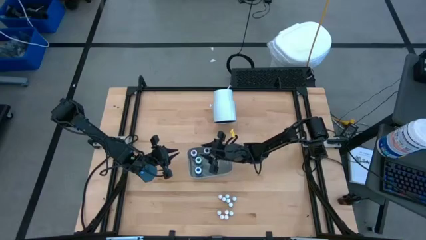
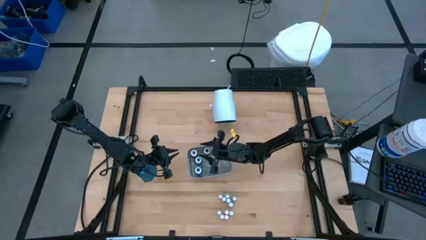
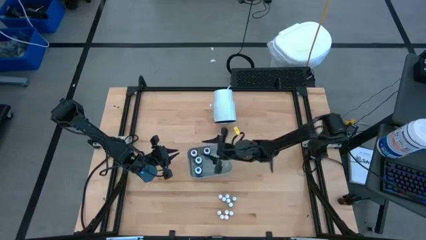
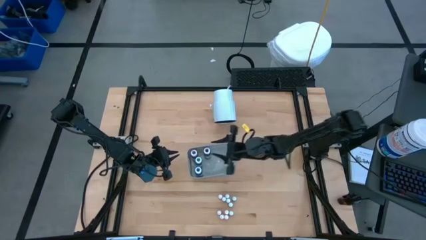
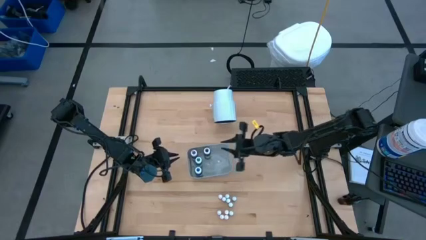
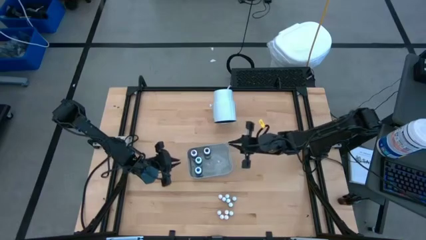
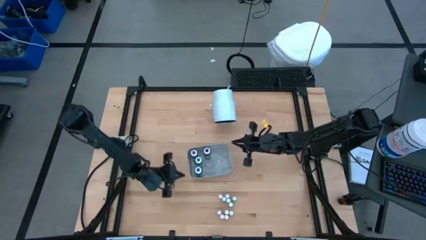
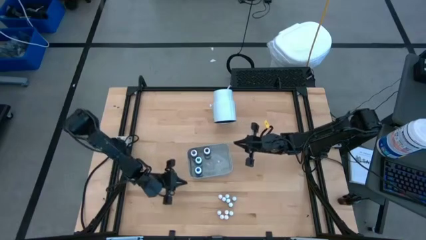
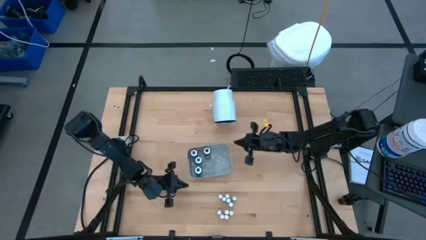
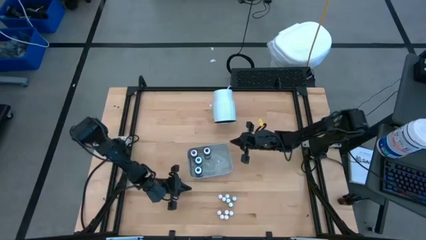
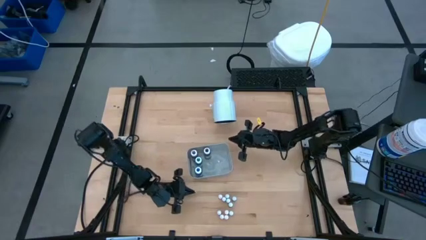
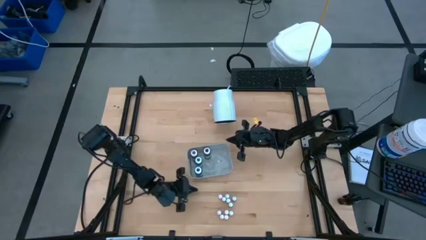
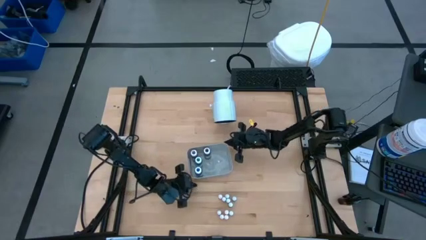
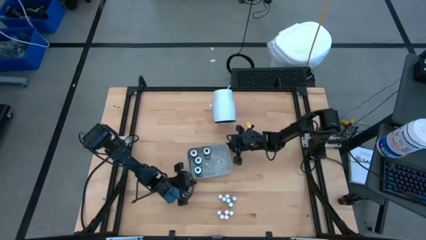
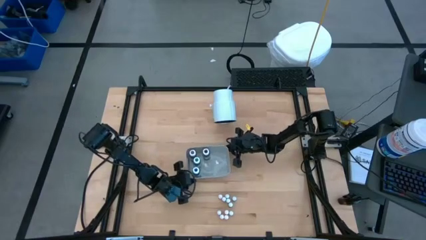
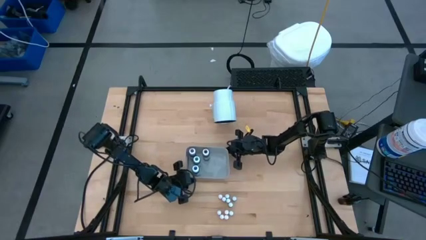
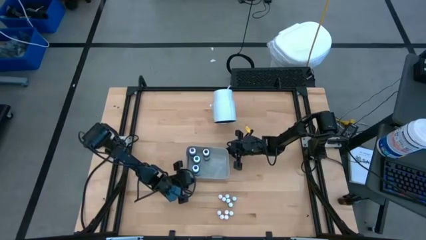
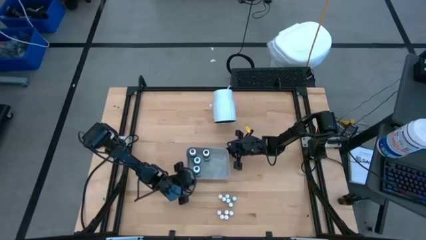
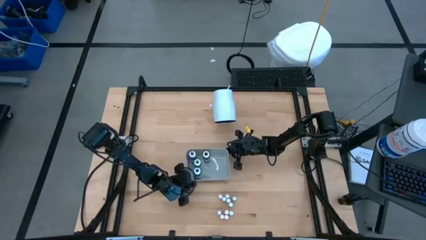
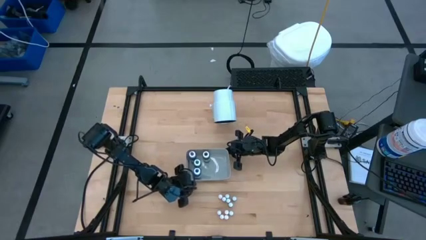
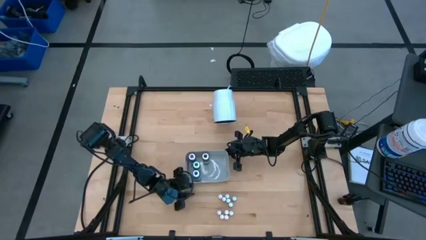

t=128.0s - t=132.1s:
Task: Pick & Place food coloring
Adjust the gray bin

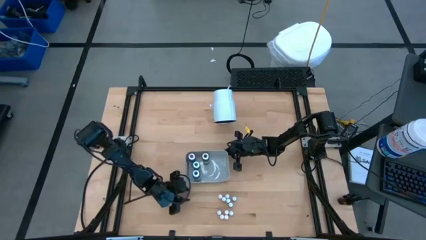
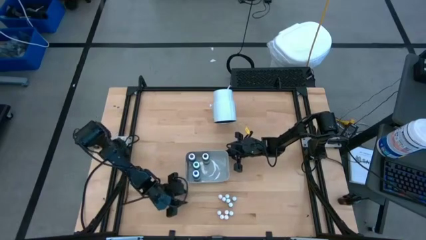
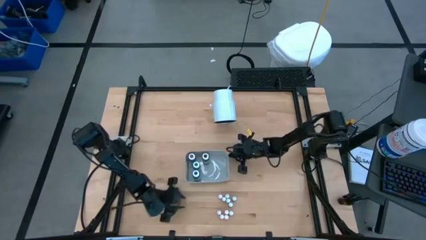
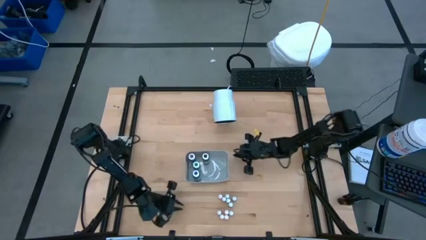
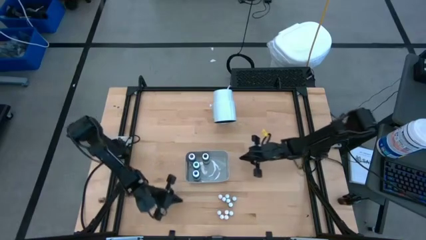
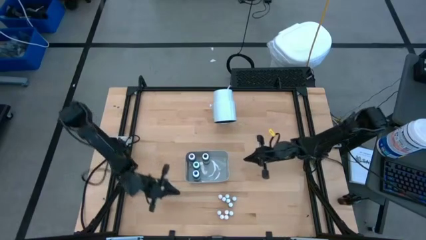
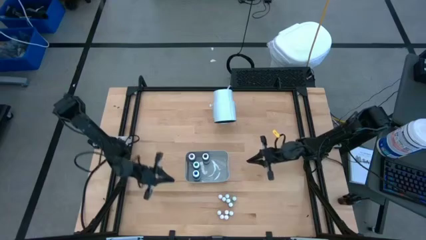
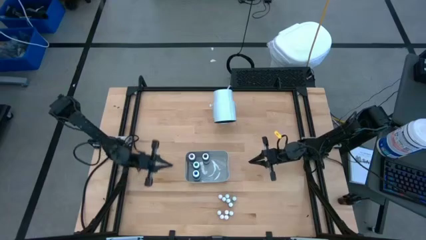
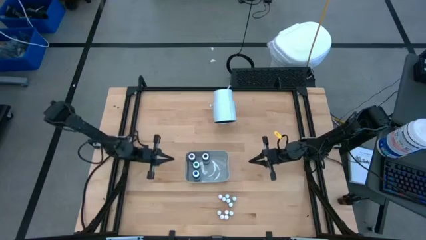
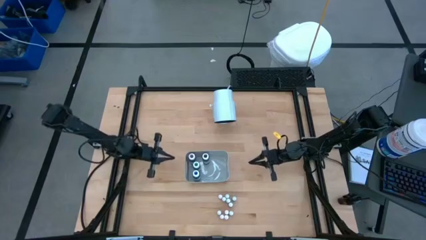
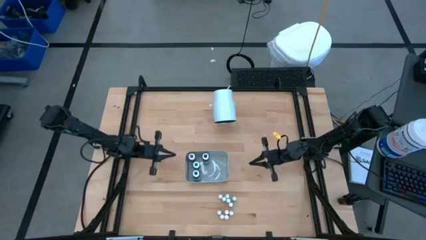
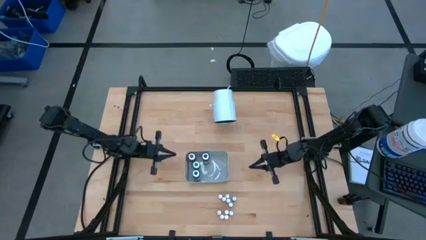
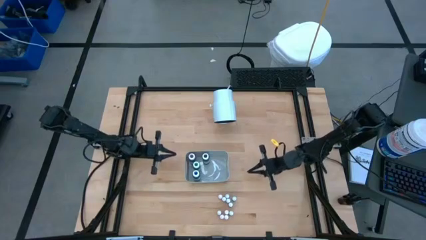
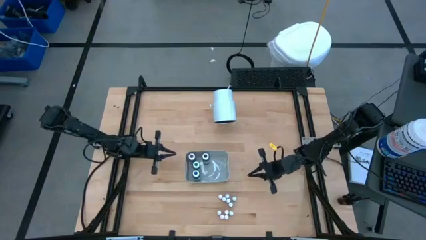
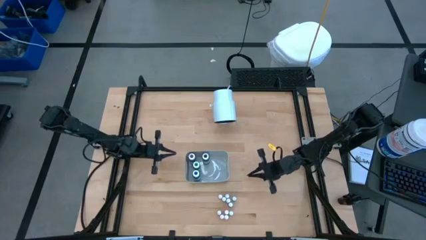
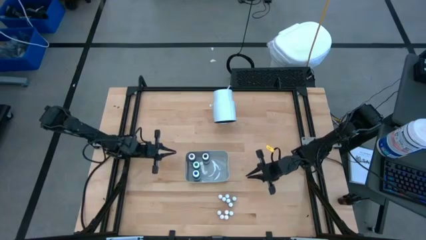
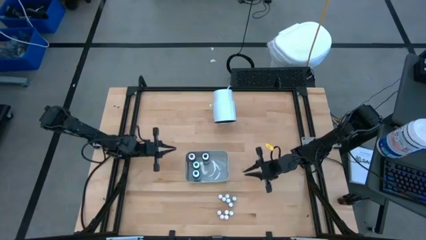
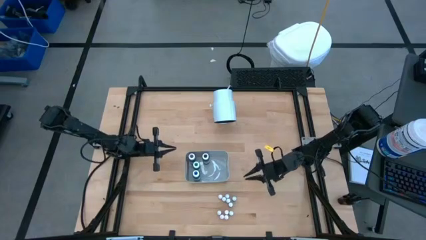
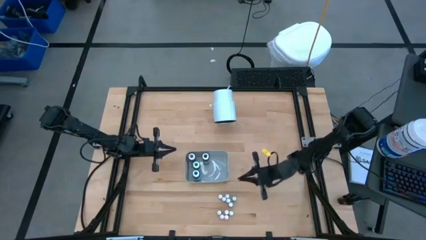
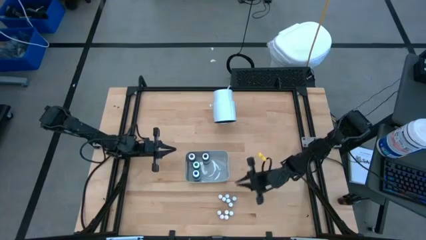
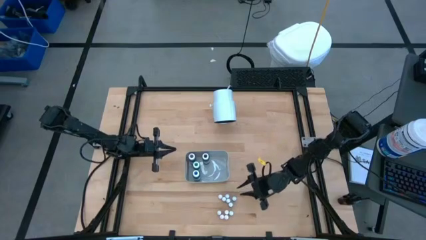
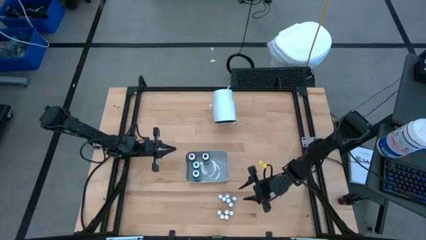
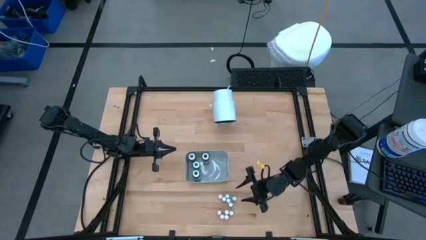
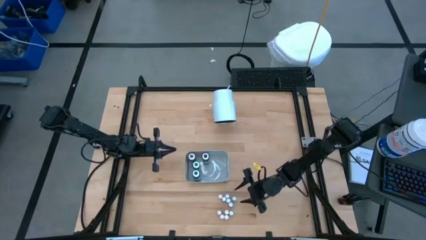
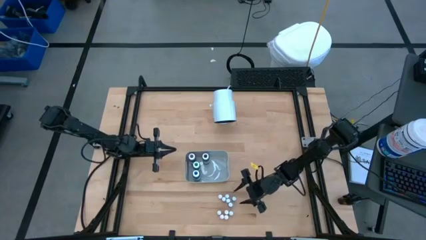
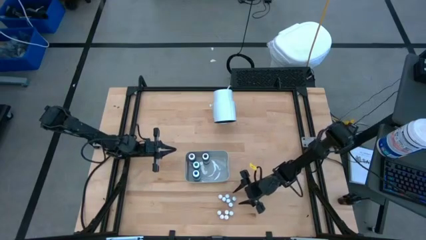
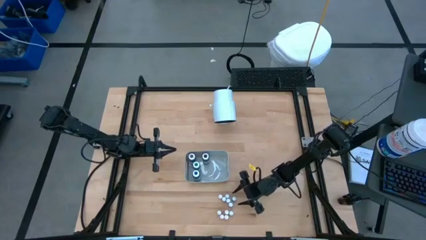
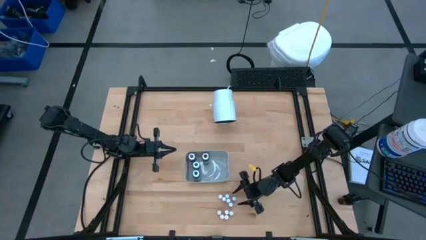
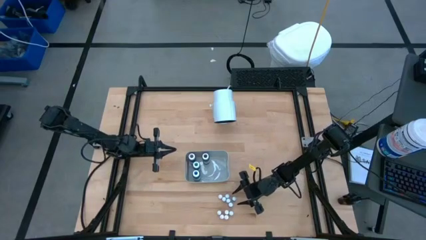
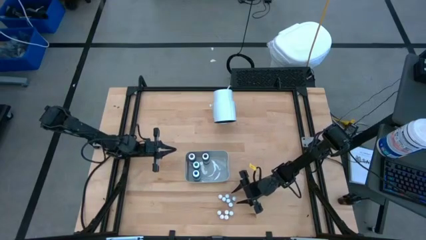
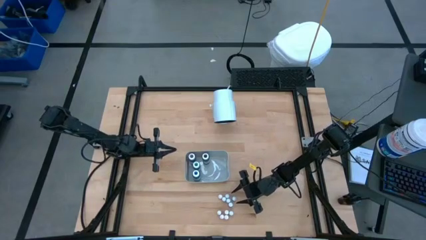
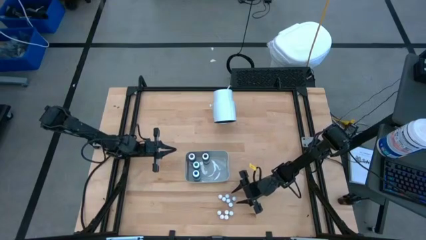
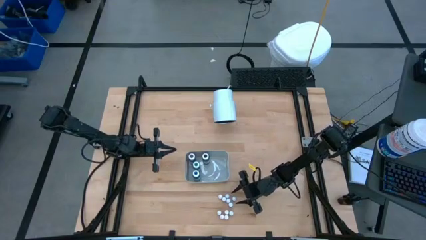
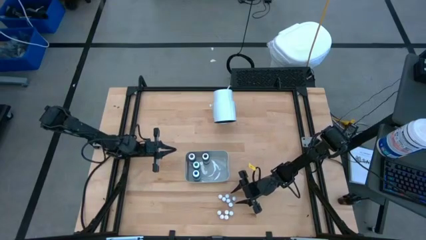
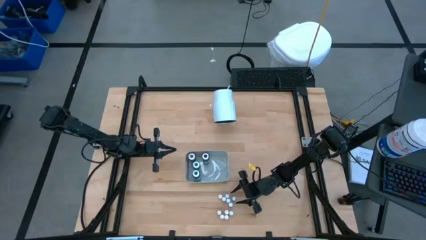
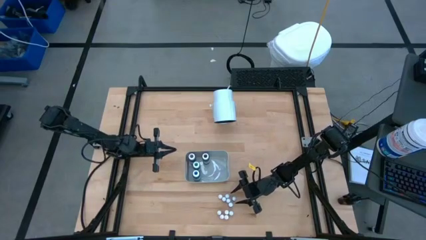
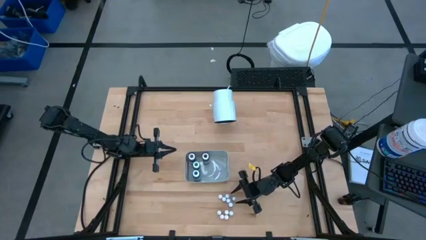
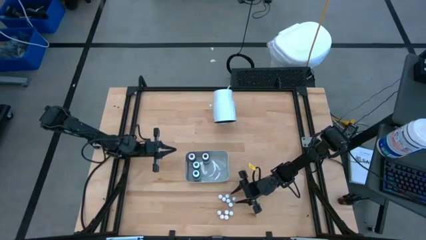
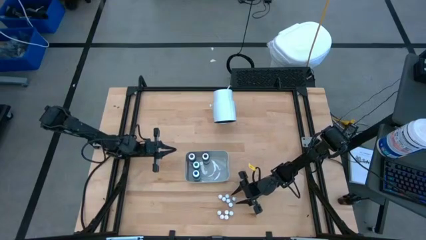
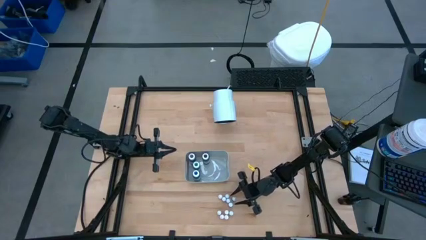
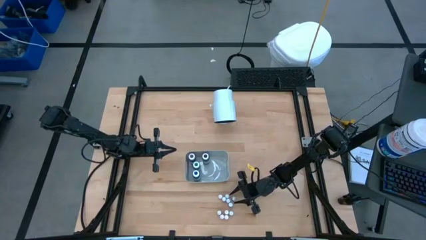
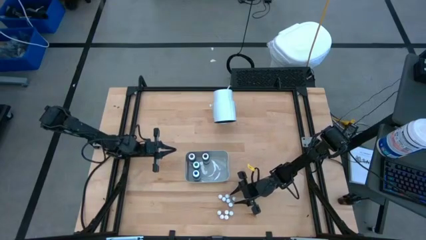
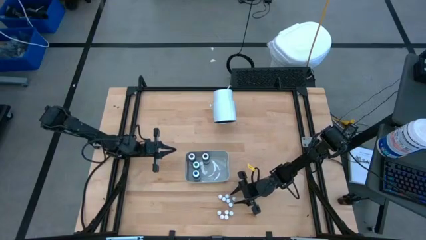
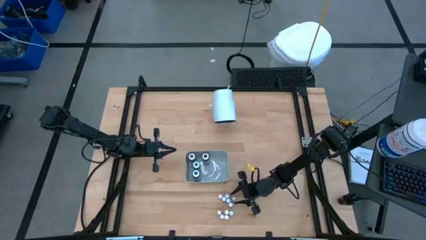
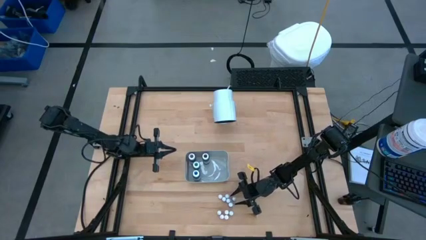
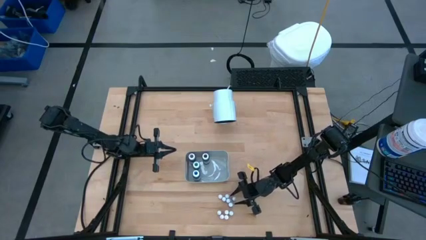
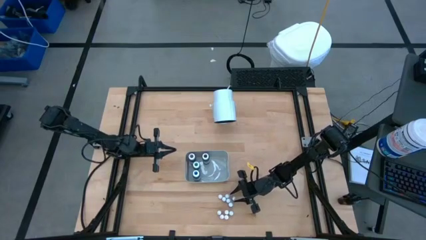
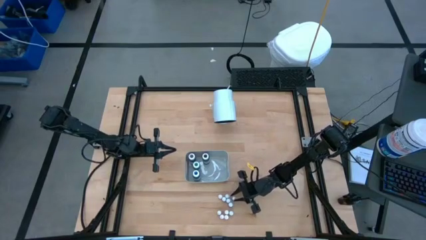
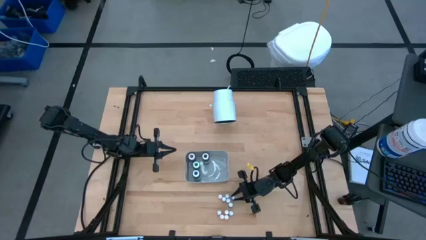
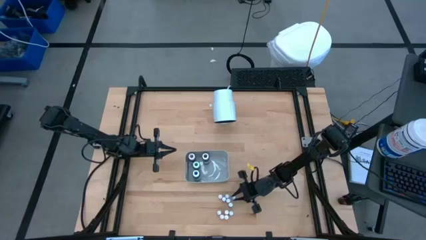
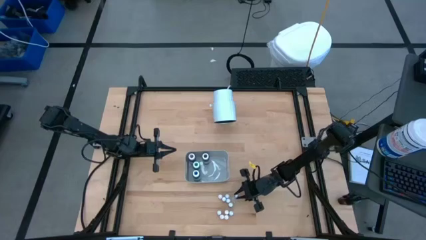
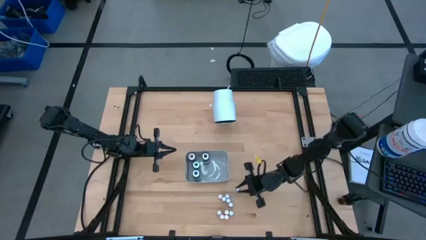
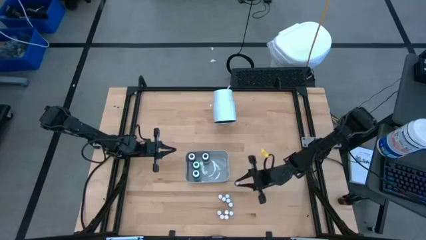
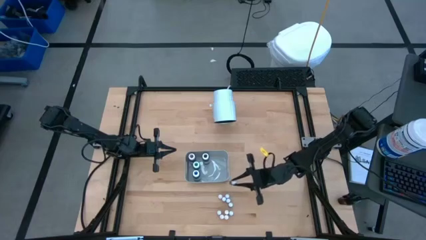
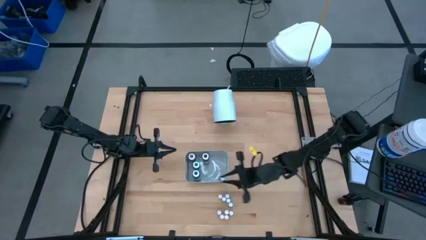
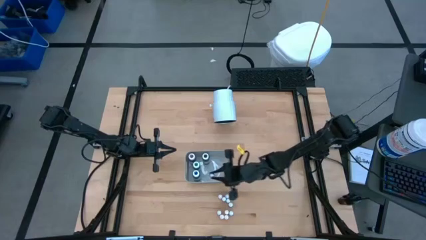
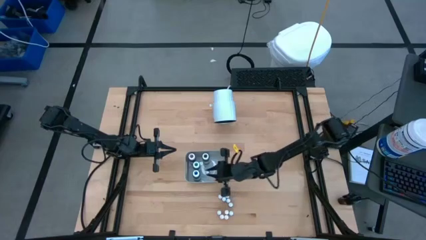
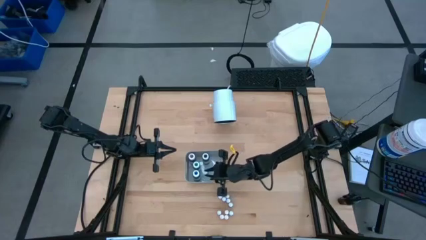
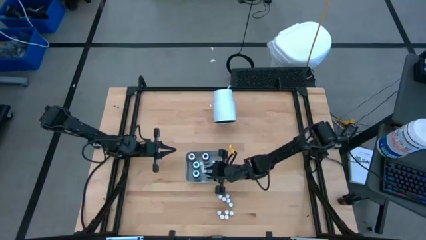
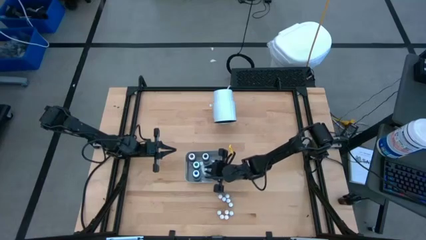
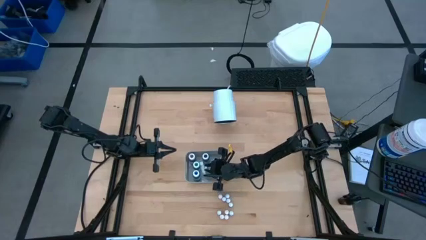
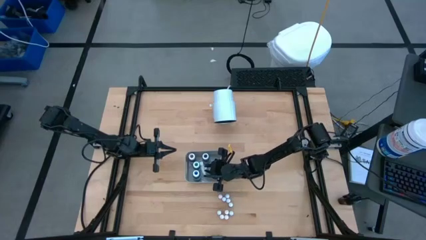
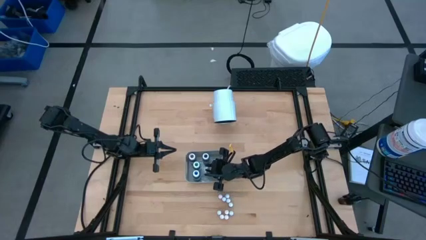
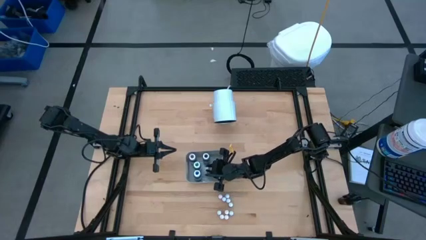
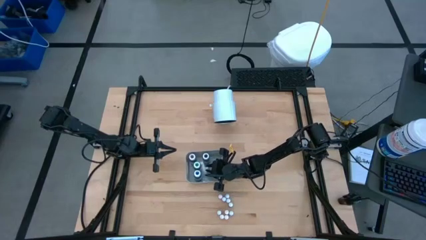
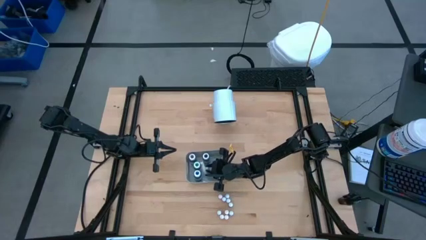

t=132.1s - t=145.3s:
Put the small black food coloring bottle into the gray bin
